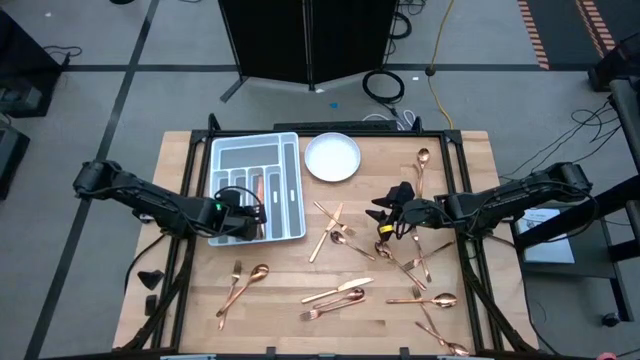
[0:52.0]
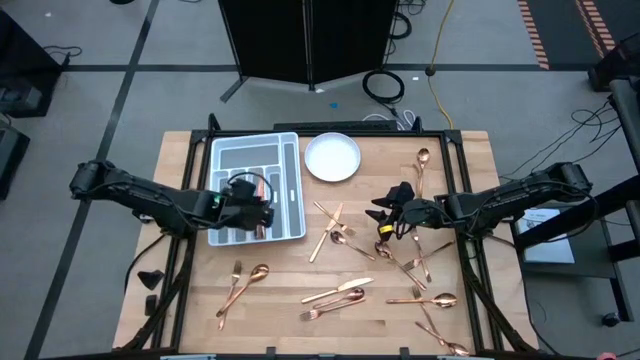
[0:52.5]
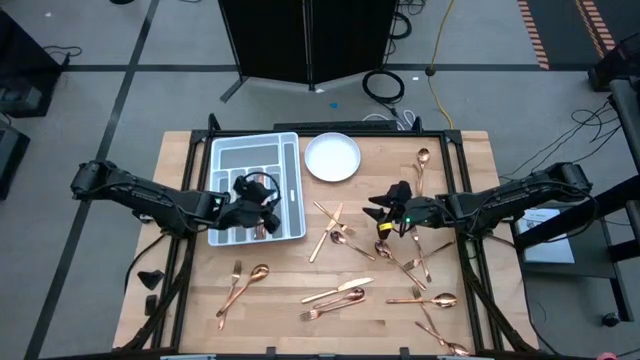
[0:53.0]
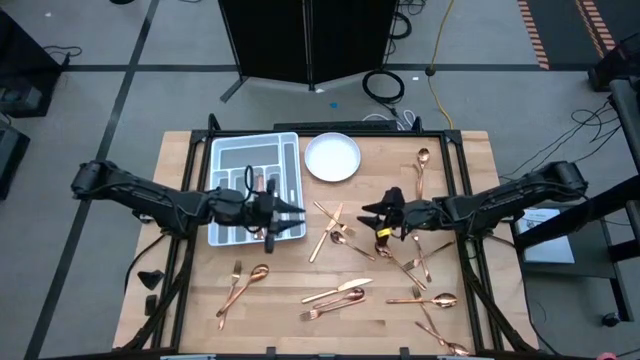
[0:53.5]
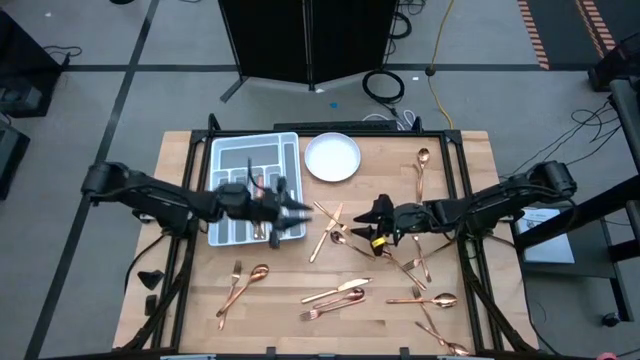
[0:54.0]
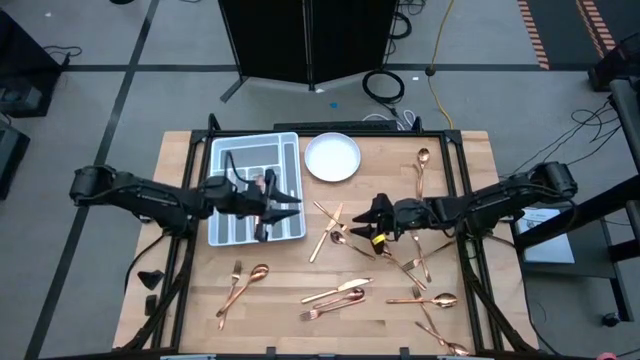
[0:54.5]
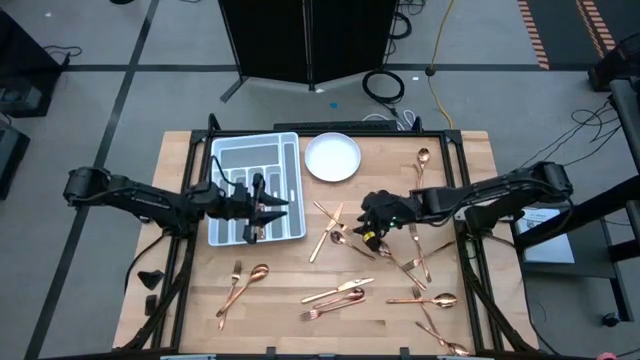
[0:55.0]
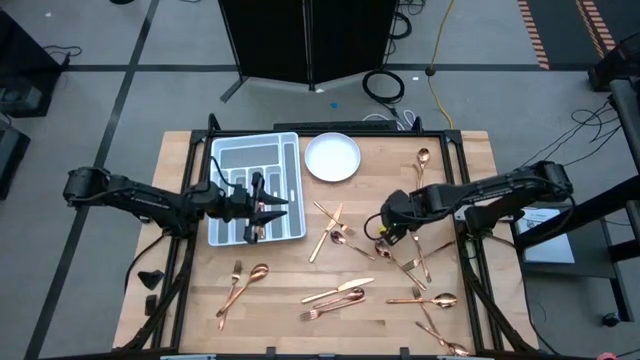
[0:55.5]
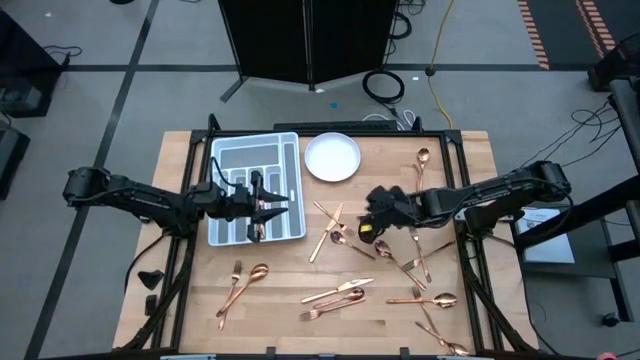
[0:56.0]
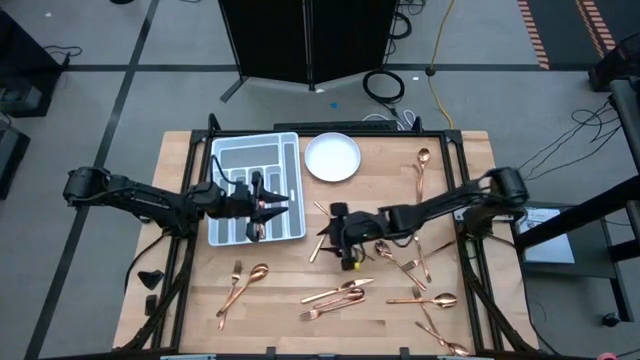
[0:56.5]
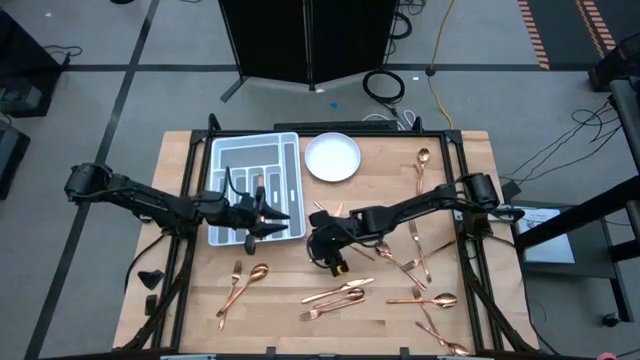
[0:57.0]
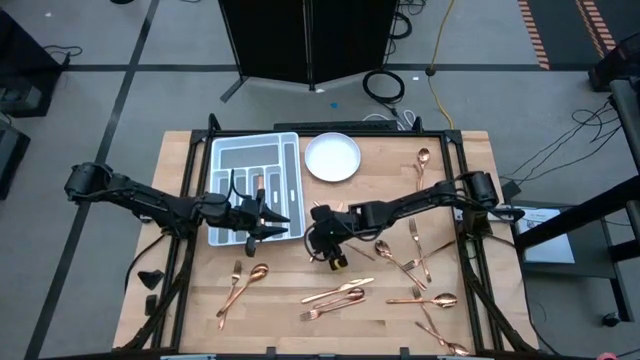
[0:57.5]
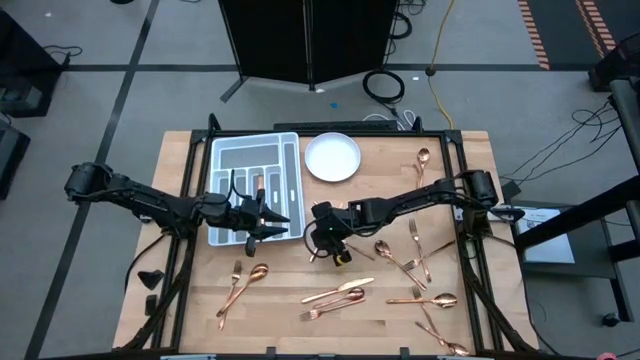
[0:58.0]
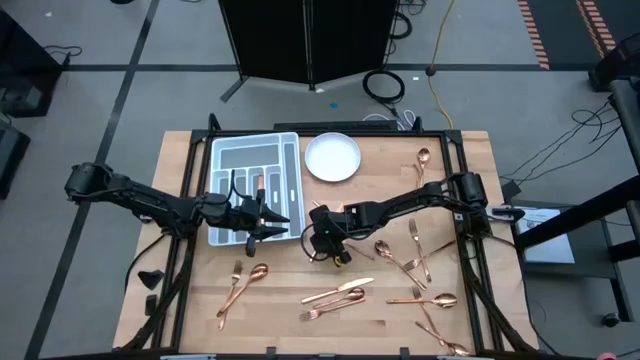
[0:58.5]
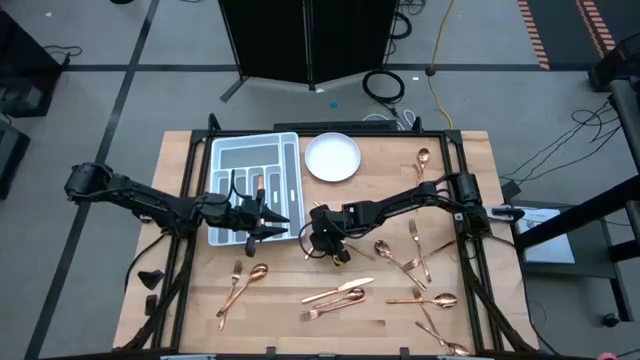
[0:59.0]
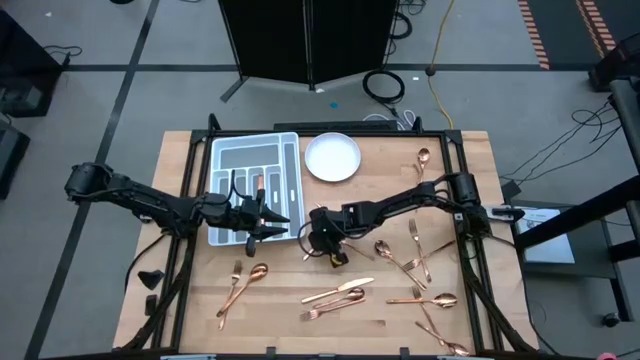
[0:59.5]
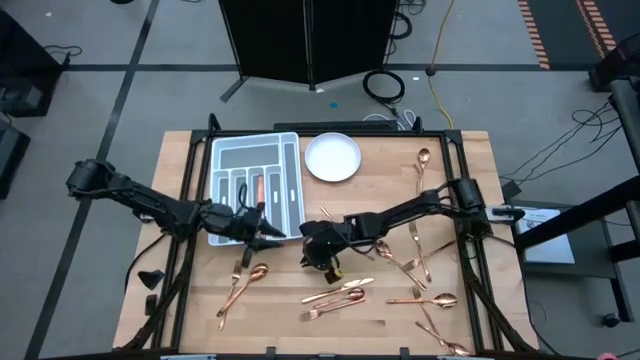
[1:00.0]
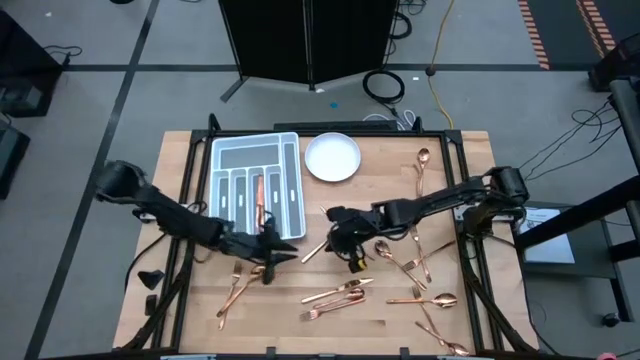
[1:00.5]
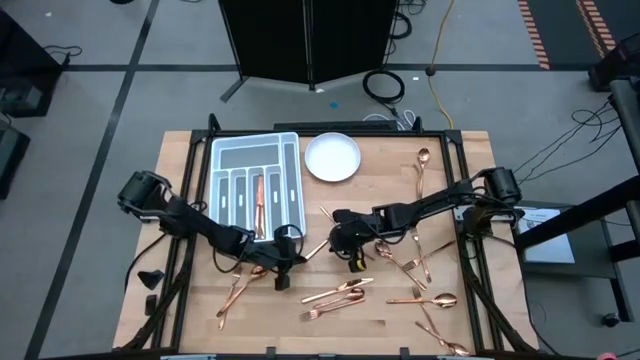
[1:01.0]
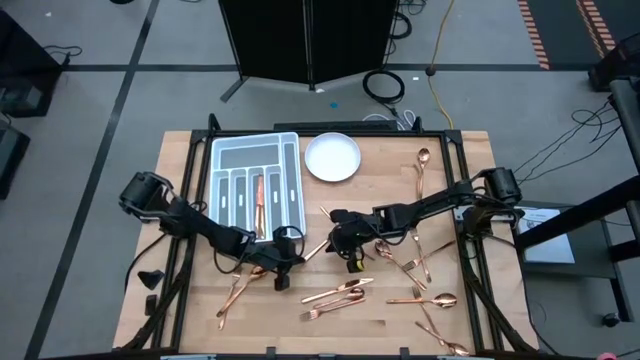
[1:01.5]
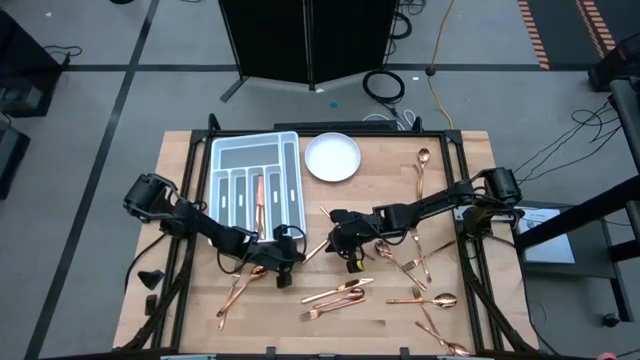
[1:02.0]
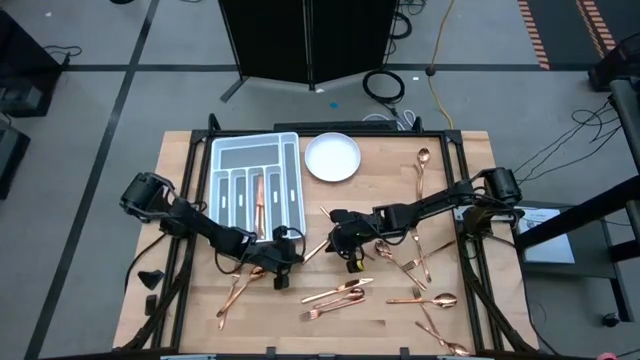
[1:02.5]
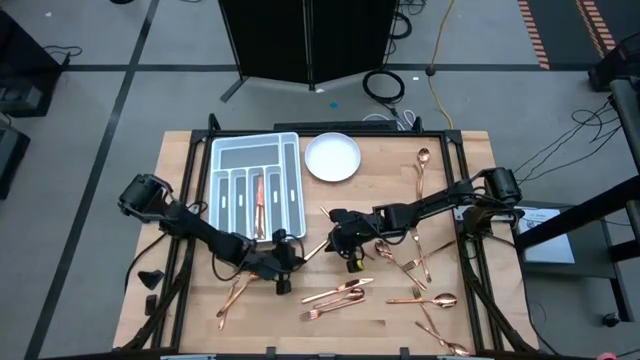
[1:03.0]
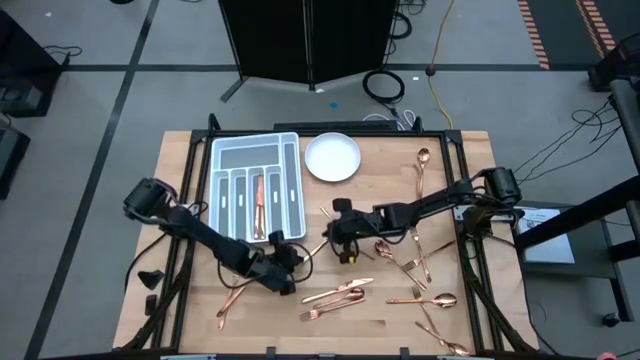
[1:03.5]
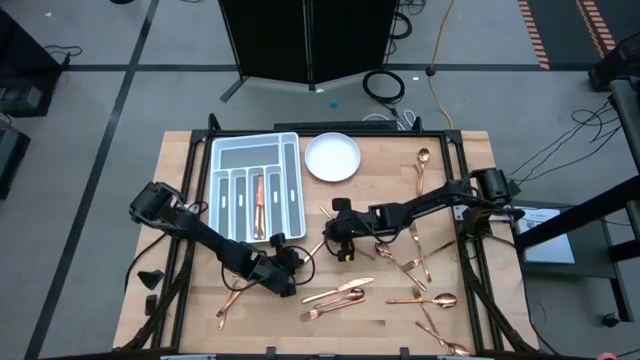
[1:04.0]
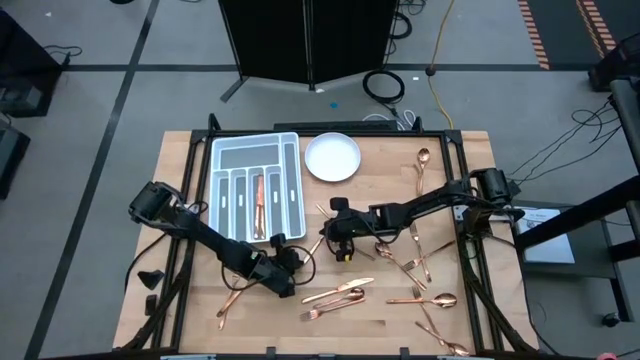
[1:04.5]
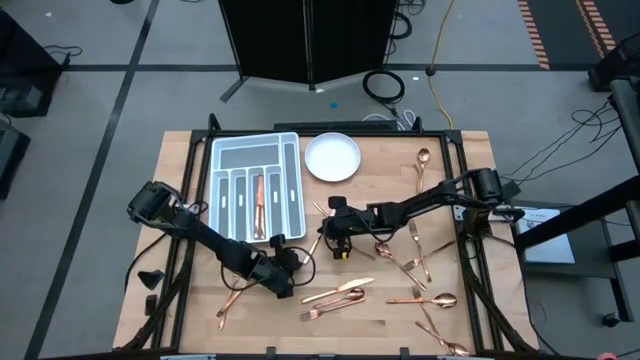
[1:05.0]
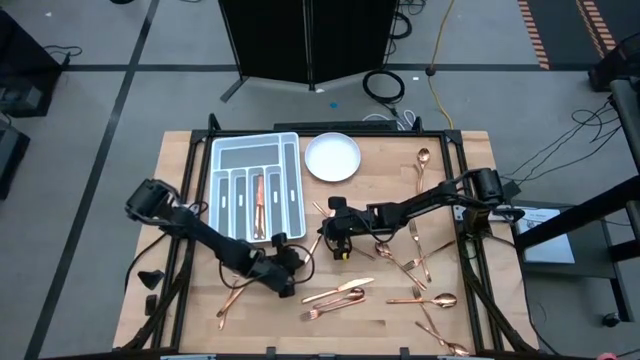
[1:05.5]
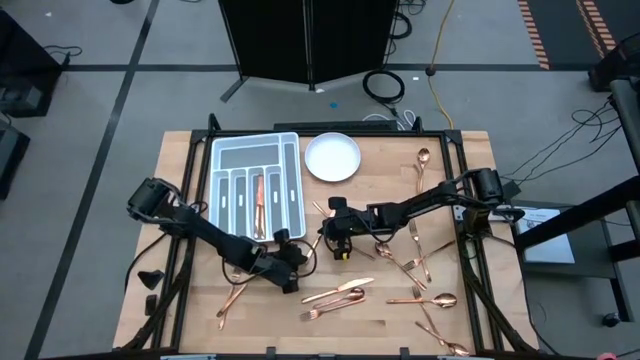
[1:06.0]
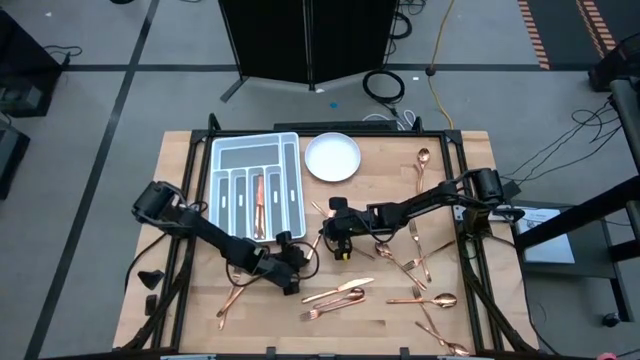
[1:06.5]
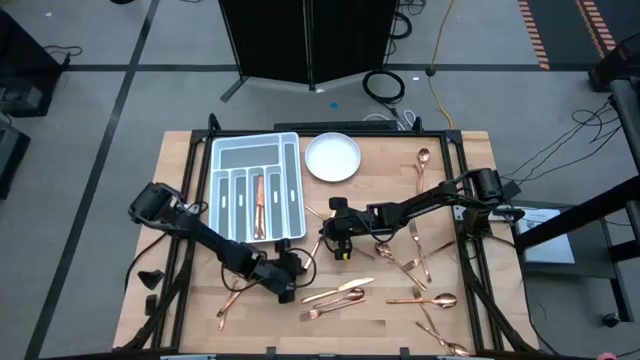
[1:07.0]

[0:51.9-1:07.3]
Task: Sort silverware
Put the knife on the utensil tray
